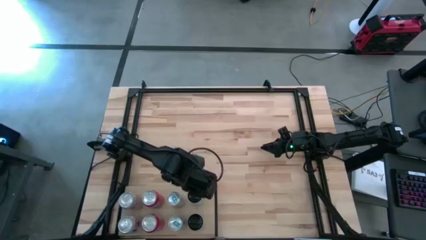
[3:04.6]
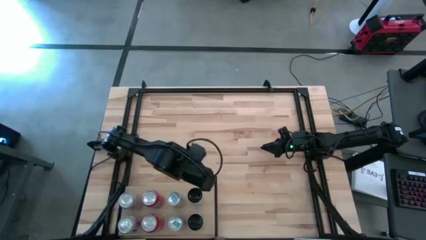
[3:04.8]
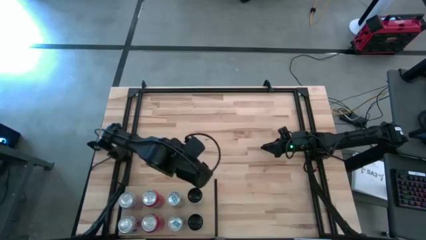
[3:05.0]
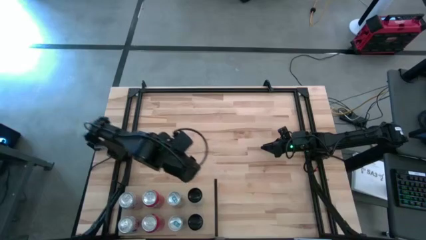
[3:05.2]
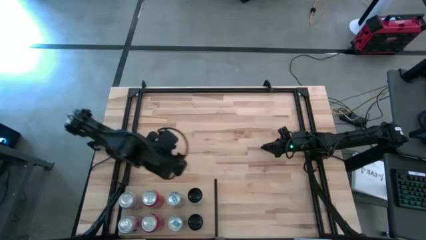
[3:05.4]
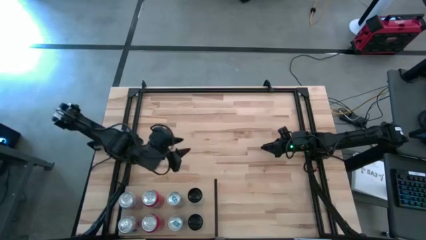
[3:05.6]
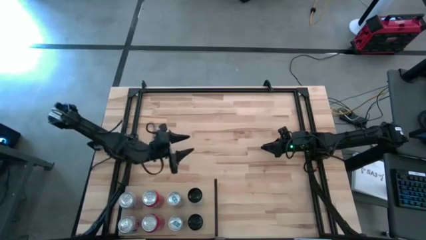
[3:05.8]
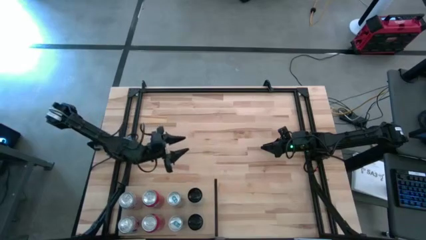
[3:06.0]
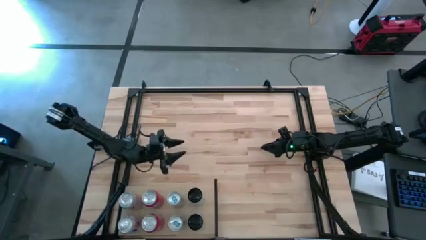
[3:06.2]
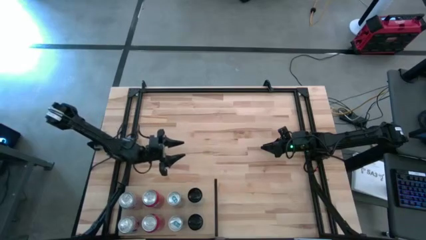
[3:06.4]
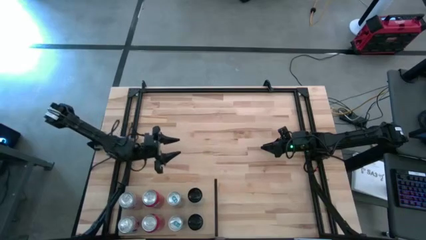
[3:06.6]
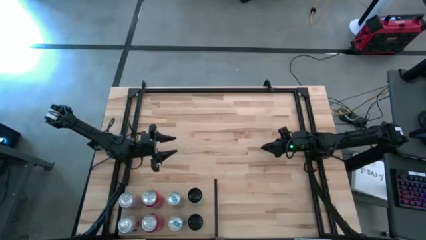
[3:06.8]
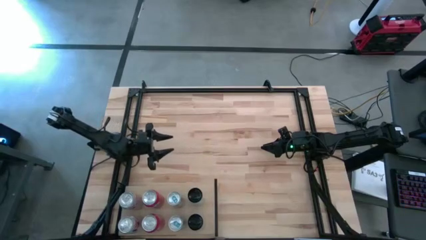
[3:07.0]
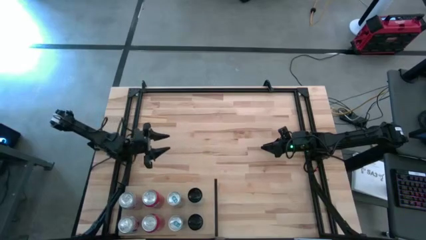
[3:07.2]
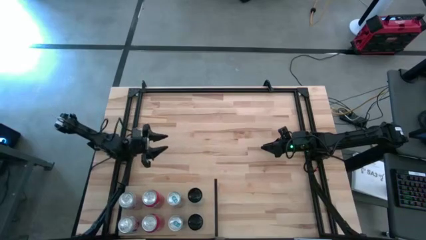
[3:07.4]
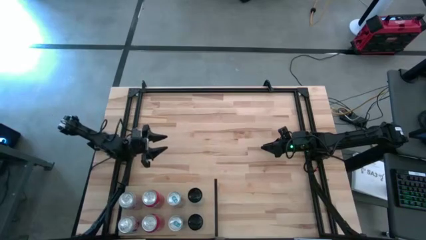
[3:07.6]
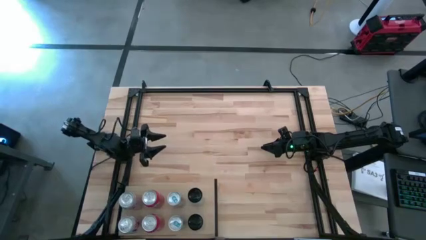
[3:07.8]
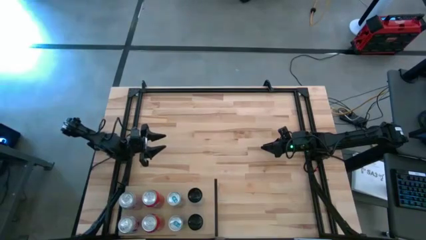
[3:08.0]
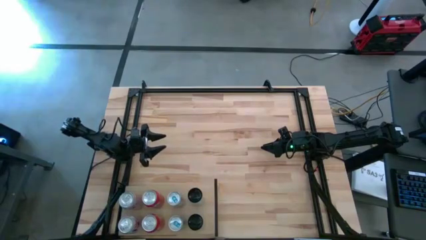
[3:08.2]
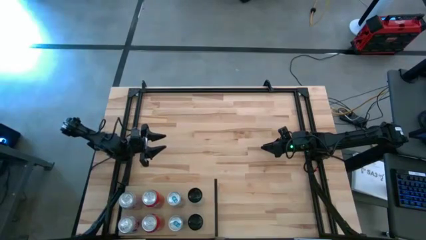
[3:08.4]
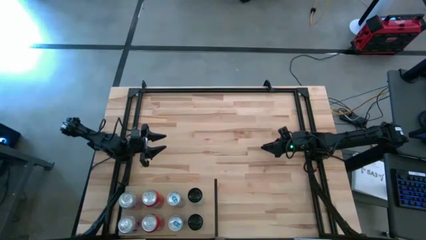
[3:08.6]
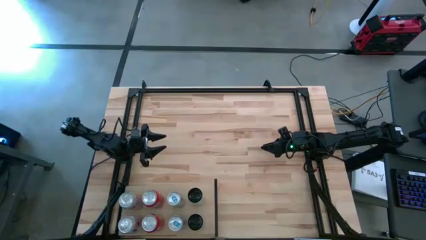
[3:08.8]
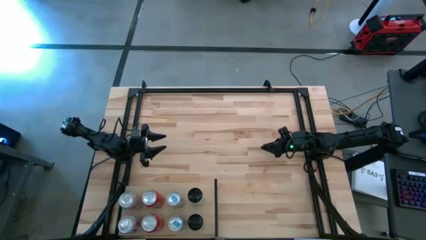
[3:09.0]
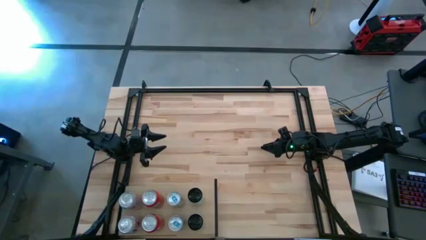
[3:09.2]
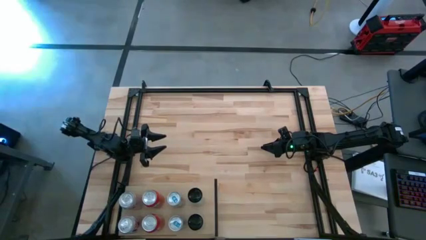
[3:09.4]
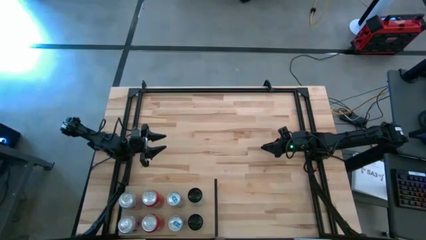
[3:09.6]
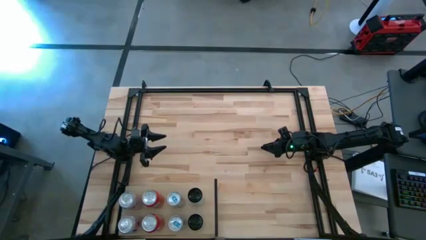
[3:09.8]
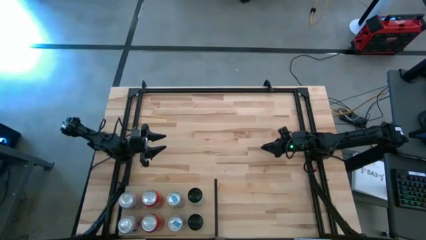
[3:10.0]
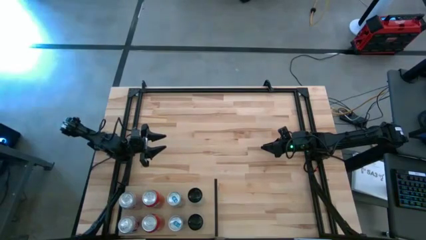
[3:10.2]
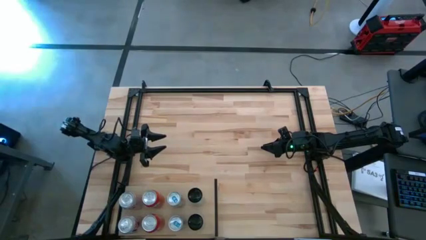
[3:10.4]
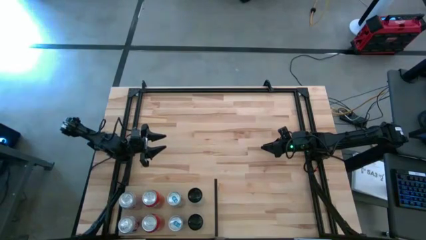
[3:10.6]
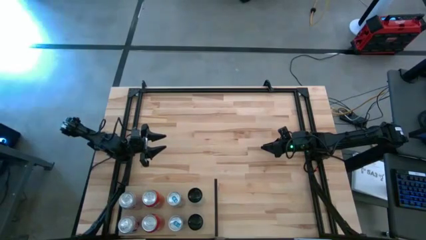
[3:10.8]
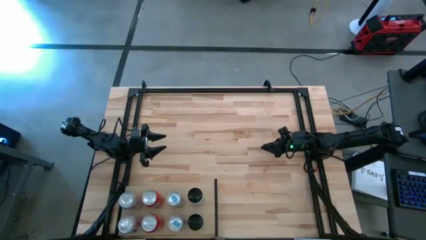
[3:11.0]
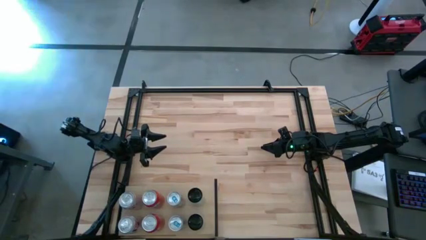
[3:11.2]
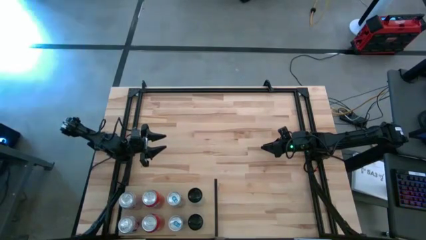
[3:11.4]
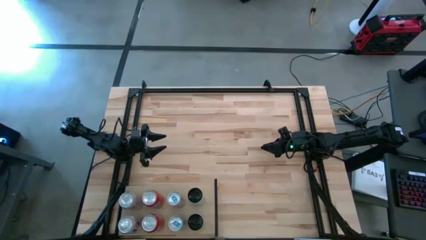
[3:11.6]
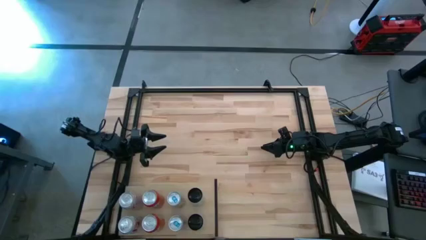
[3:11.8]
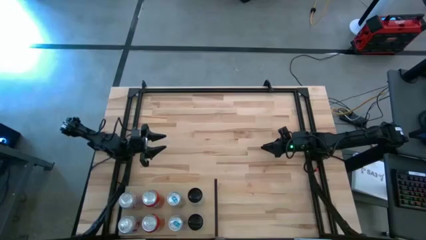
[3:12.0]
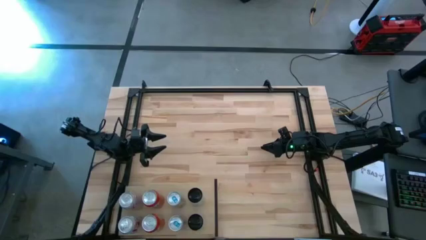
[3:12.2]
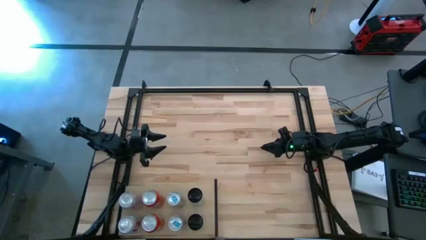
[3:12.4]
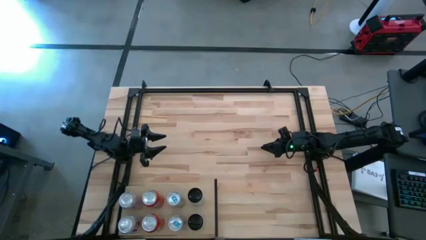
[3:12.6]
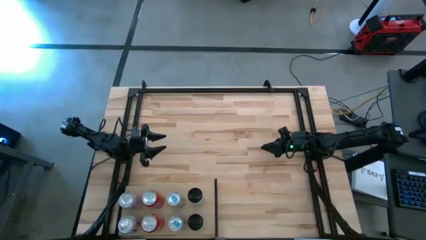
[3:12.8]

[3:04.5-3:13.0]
Task: Place canned beverage on shelf
Return to Home Position

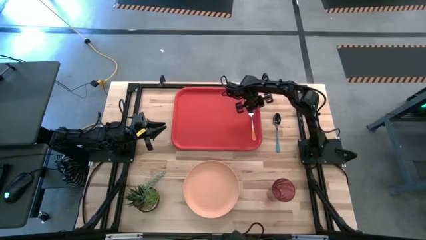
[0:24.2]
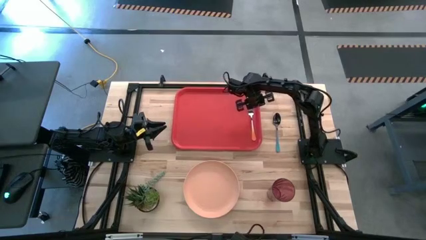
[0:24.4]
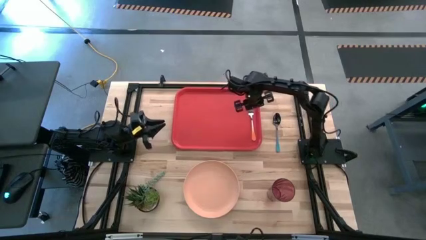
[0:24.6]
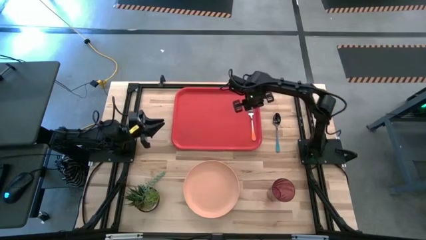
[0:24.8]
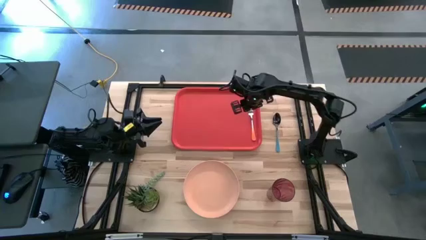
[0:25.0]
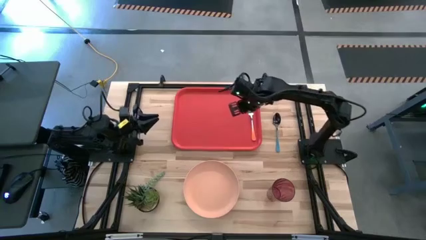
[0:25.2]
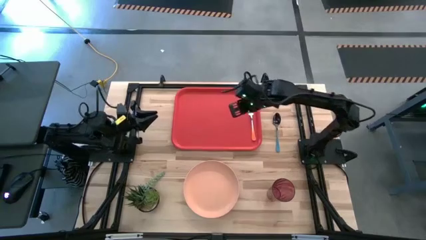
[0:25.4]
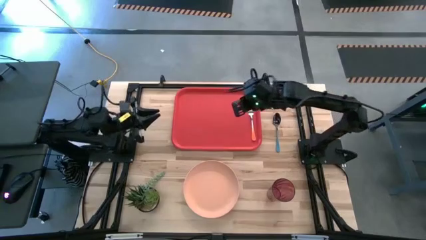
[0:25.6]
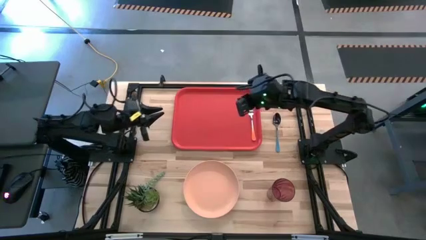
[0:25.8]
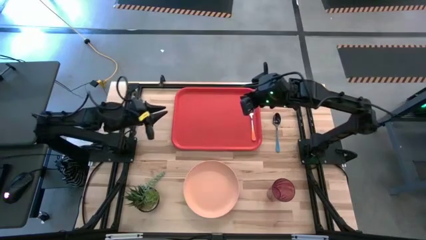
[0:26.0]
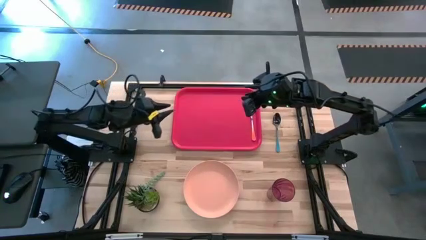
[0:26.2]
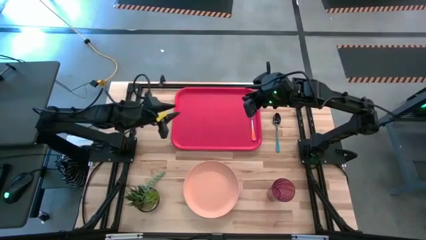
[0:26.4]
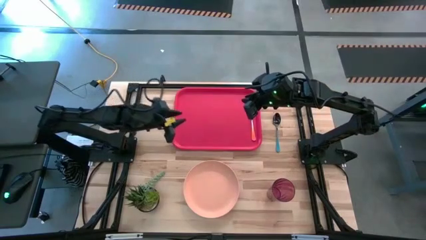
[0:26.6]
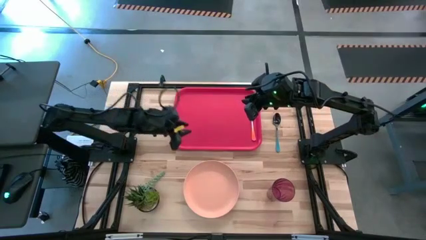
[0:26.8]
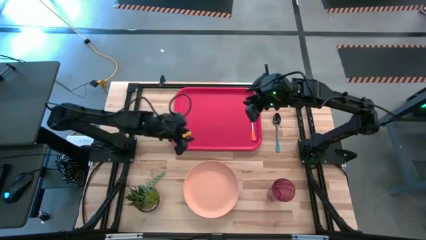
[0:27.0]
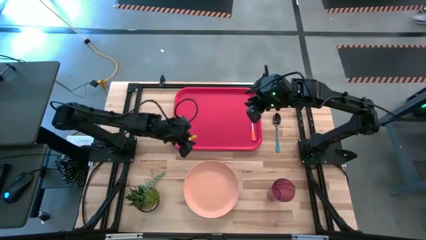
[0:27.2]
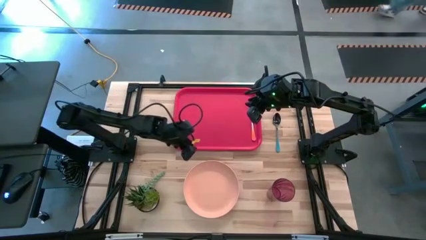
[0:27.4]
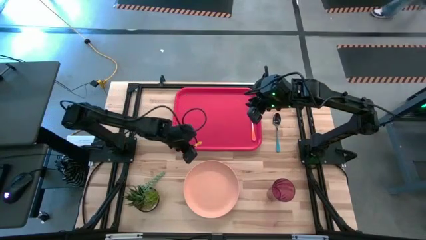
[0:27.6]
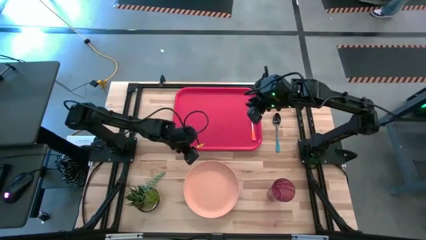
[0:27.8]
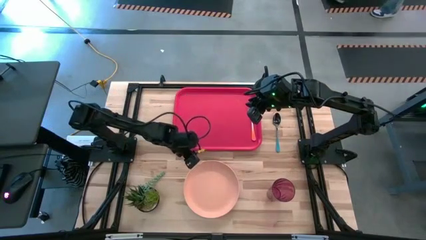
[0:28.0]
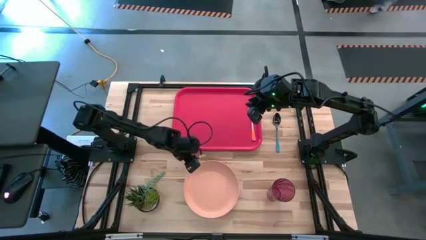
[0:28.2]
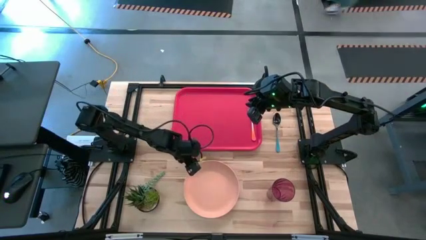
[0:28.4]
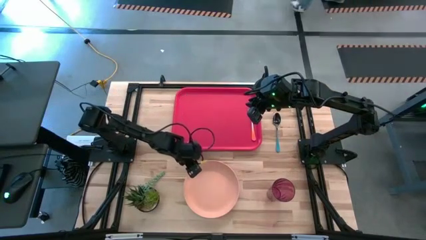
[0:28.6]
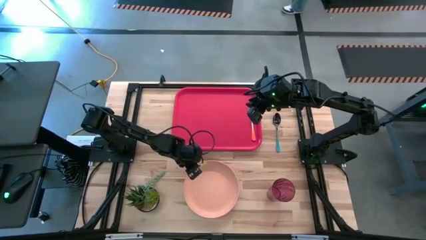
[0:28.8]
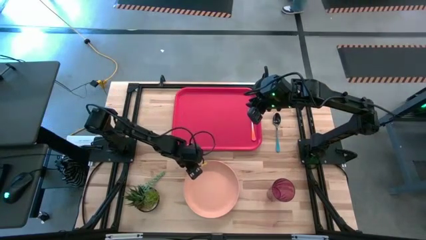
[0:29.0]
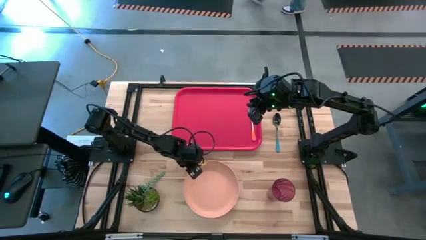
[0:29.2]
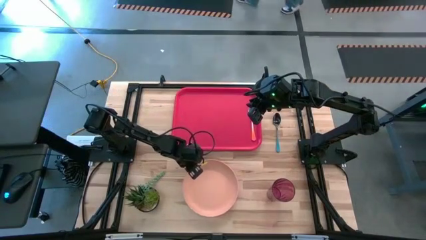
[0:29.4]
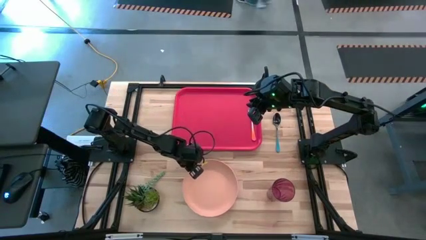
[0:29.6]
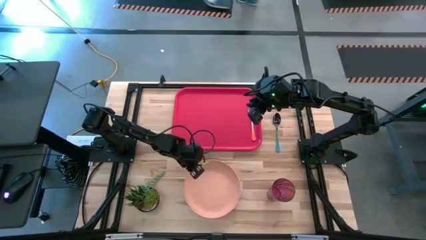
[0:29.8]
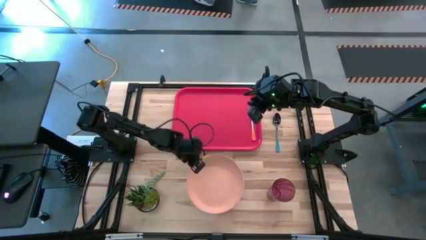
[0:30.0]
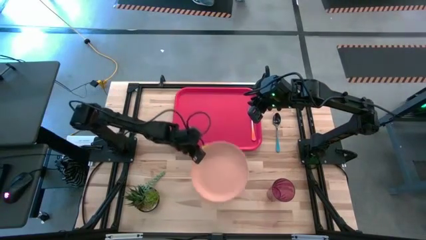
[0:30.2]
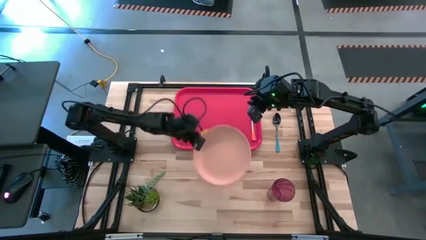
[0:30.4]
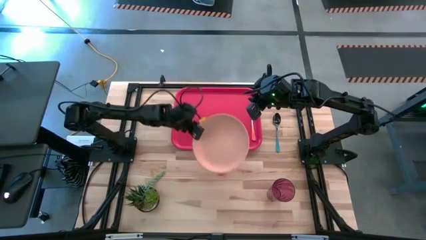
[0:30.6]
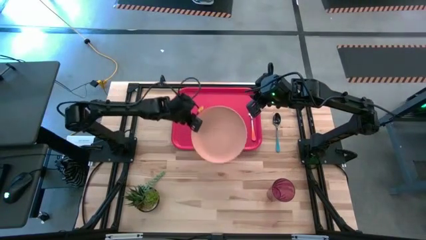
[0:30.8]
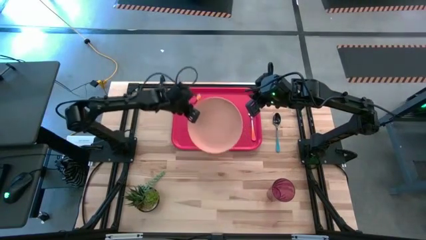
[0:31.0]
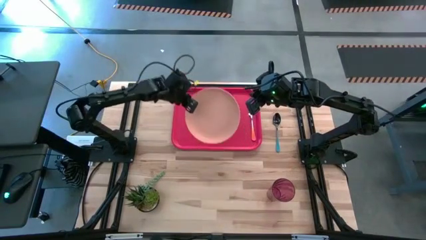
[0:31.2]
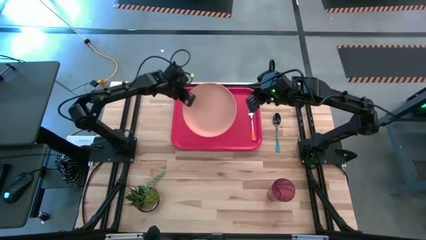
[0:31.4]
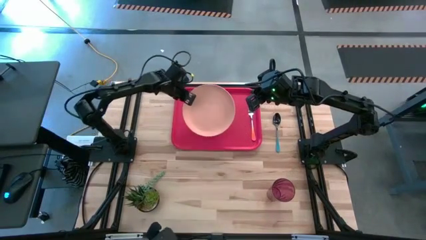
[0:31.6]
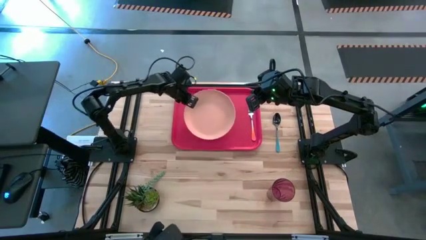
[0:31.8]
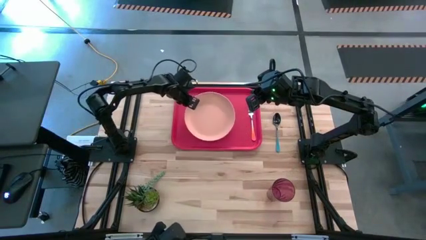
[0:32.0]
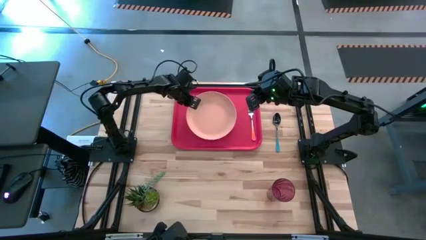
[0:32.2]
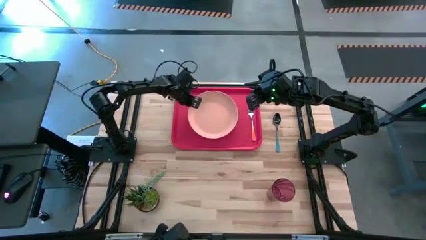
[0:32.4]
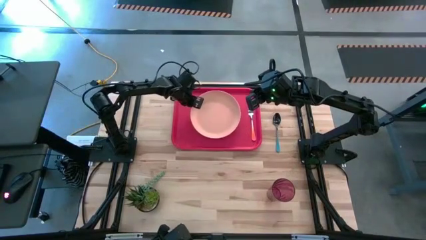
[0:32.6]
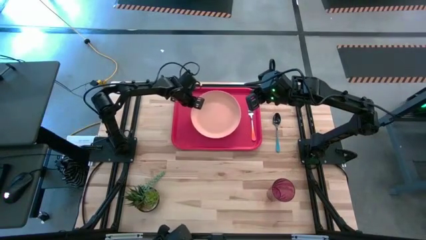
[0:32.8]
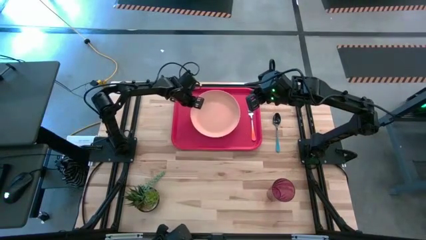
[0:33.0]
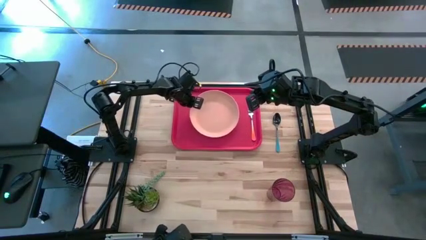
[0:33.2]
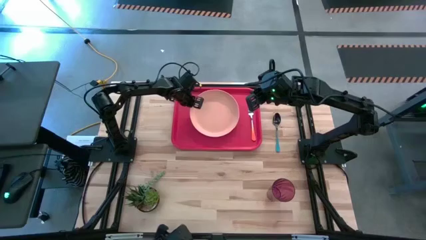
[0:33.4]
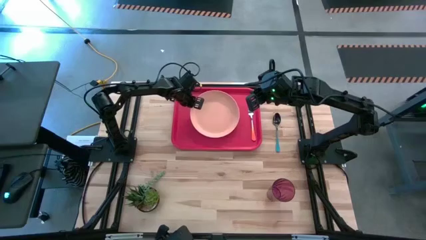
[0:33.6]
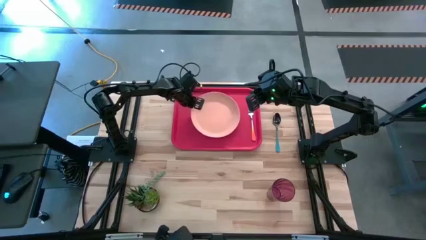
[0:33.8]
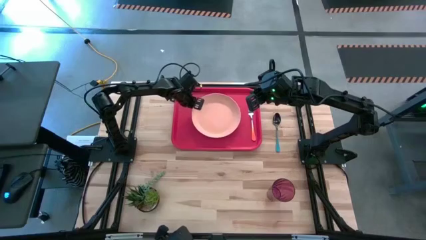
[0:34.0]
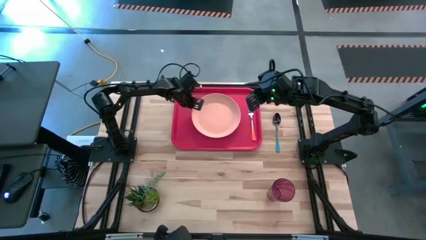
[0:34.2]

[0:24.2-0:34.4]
Task: Pick and place plate/cup/fork/spoon on tray
Put the light orange plate on the red serving tray to the left of the orange fork
